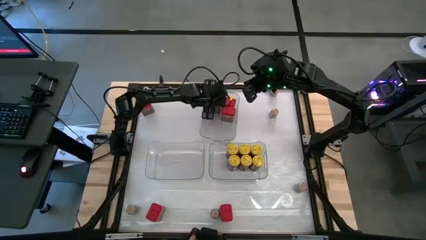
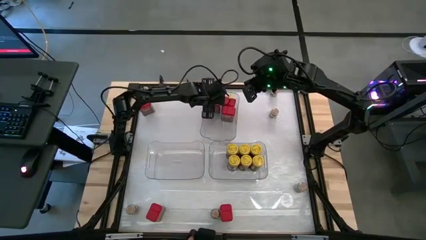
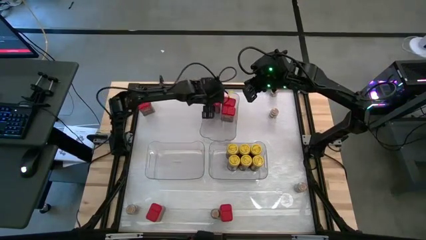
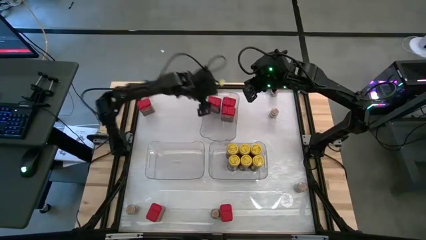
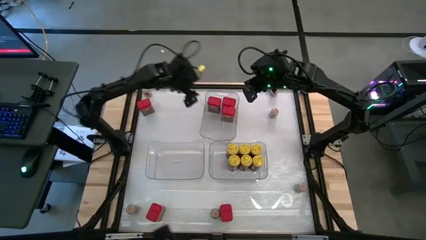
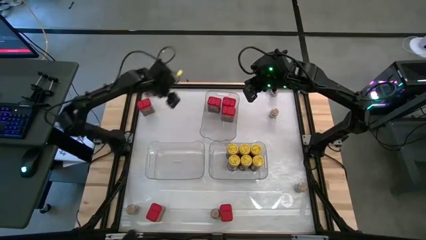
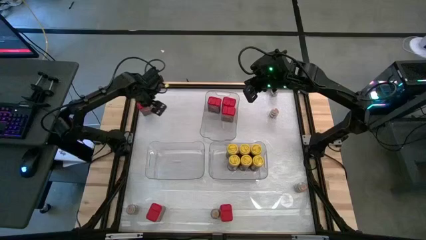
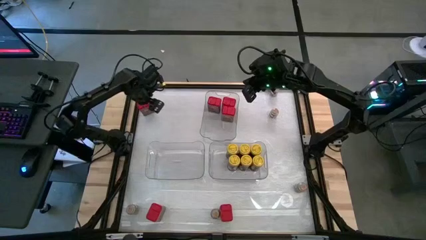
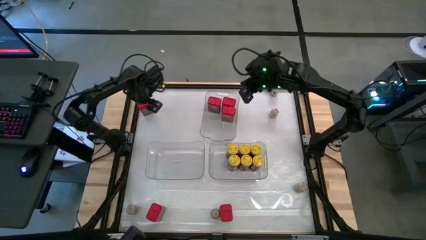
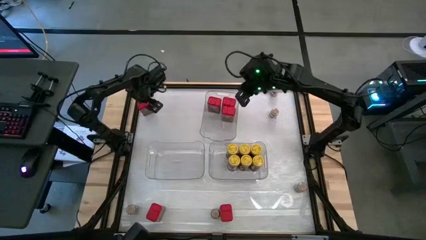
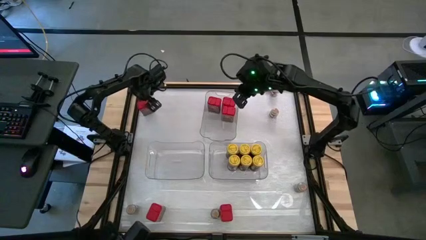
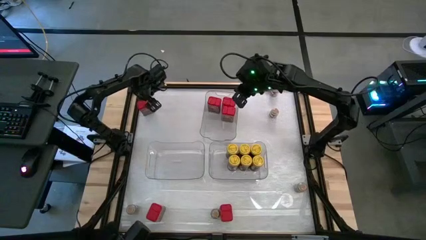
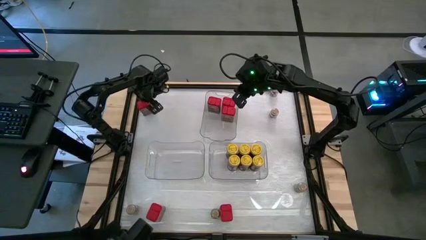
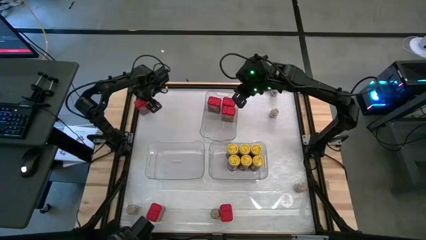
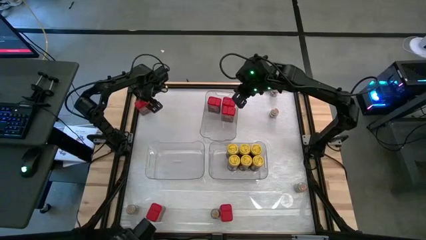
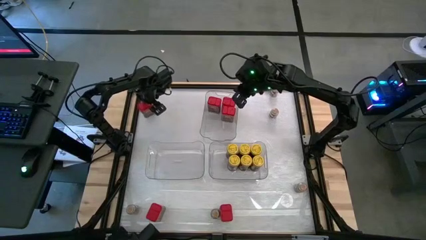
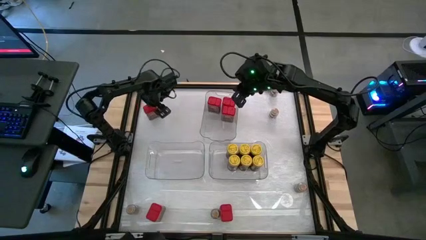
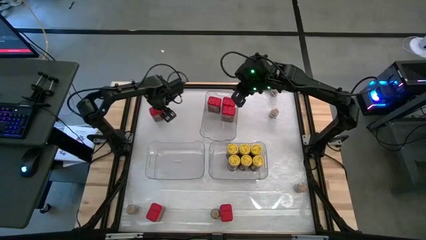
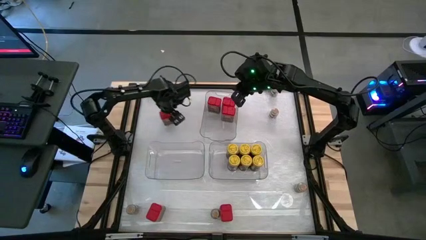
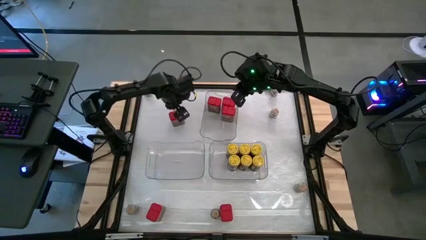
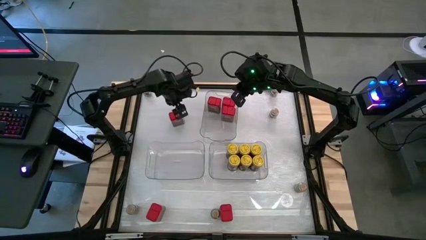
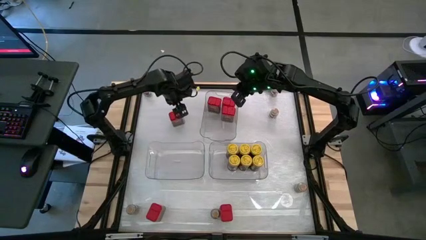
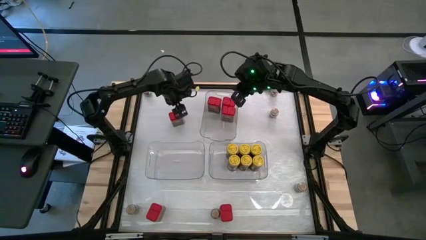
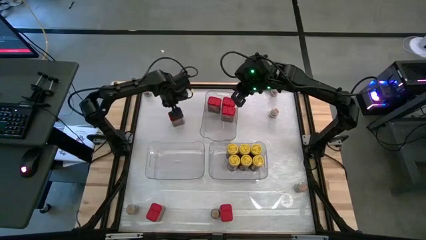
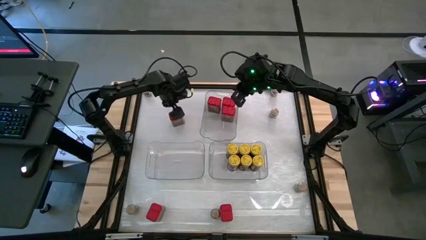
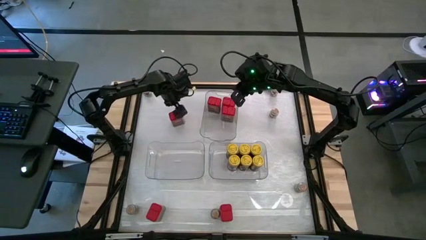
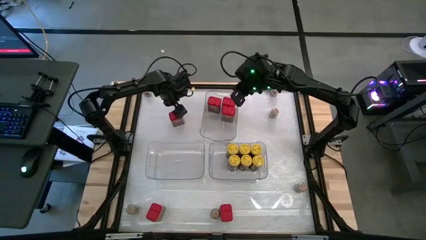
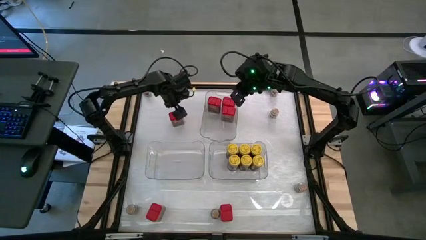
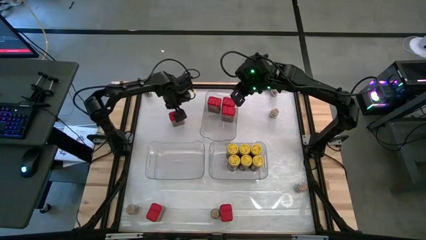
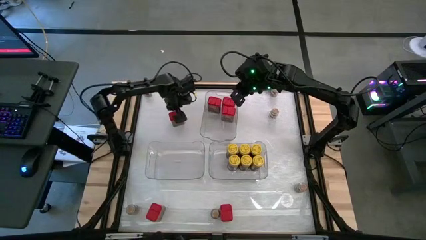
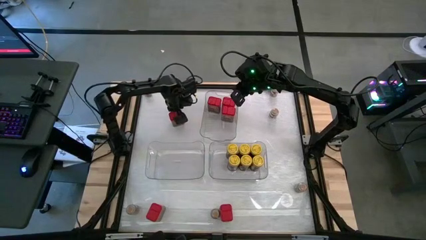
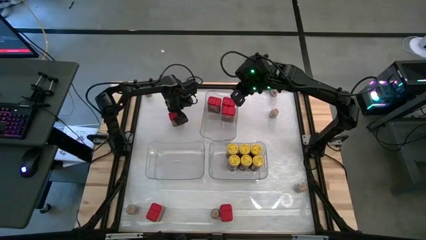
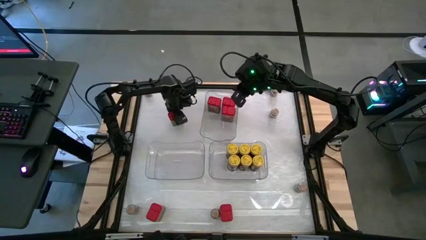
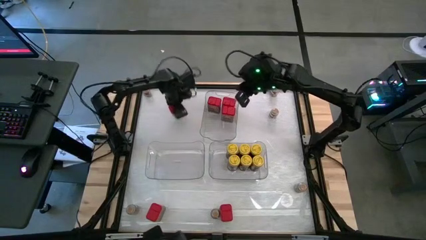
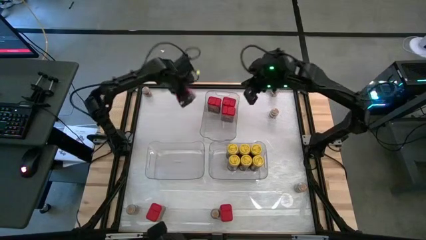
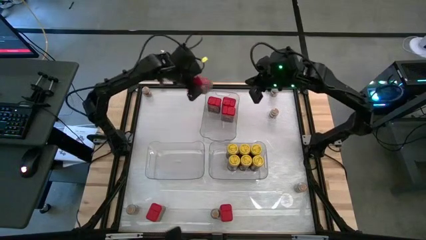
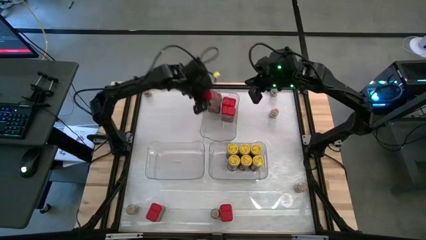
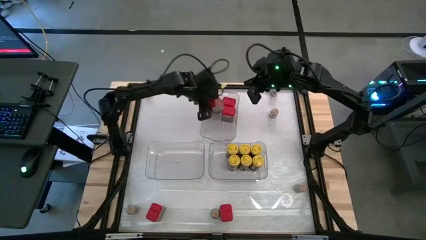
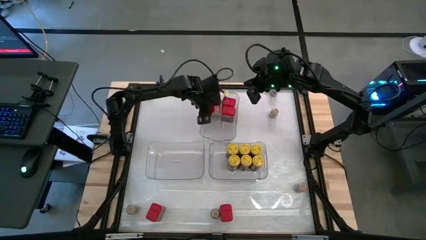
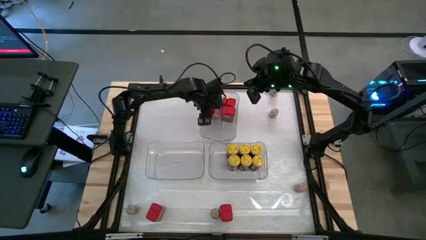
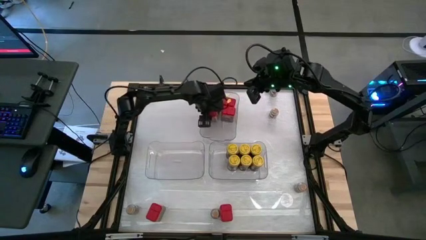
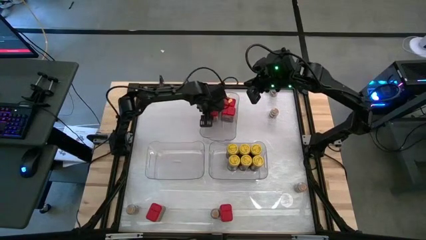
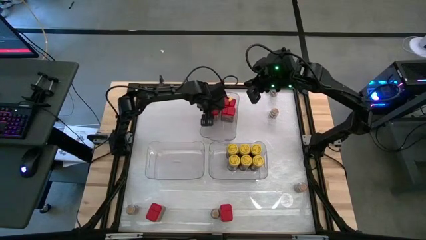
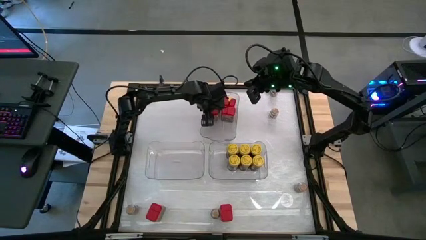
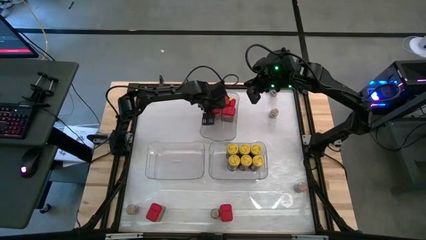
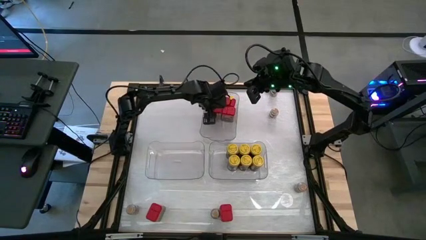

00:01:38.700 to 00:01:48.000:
Task: Sort spices by type
Put the red seasoning can into the top transparent bin

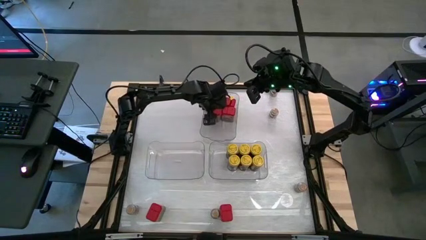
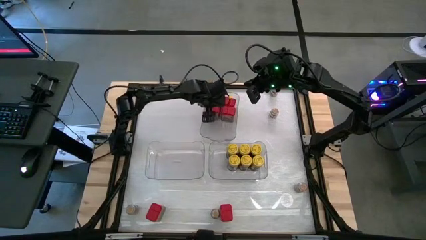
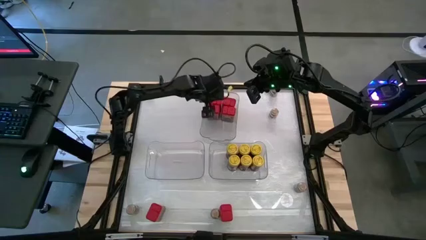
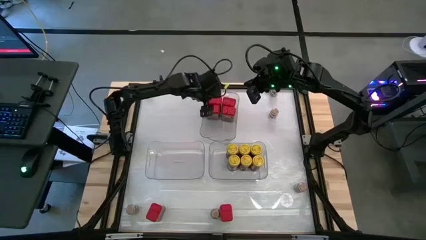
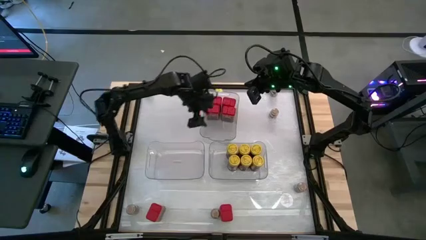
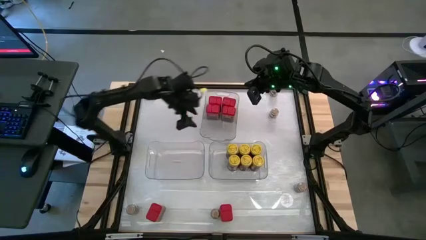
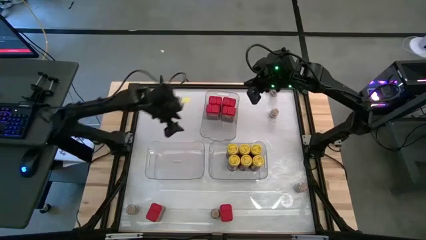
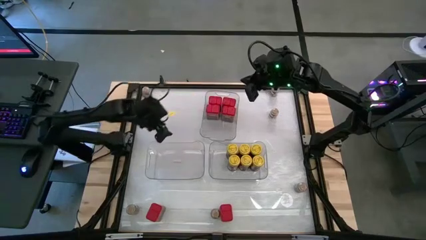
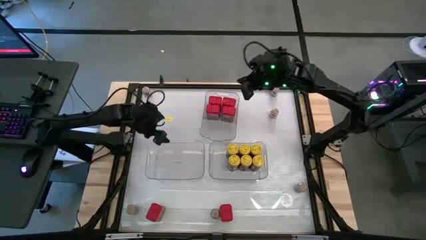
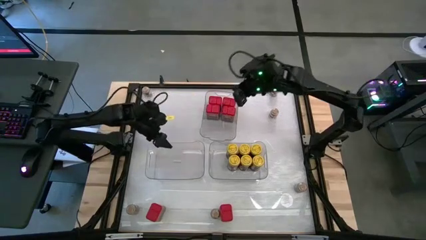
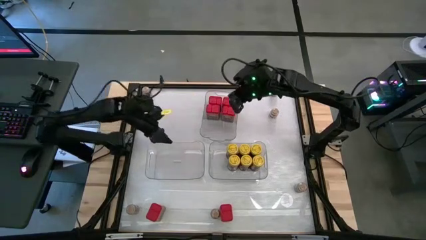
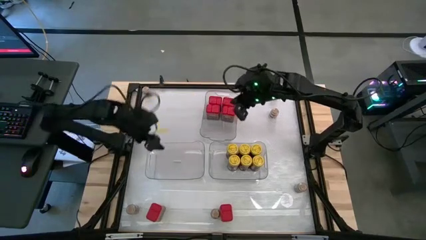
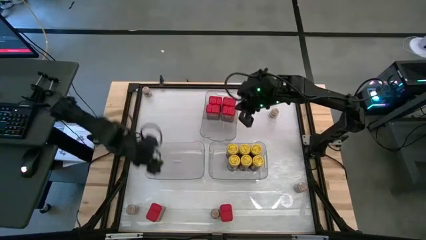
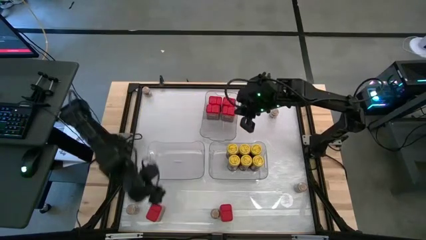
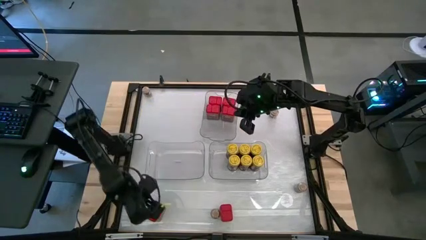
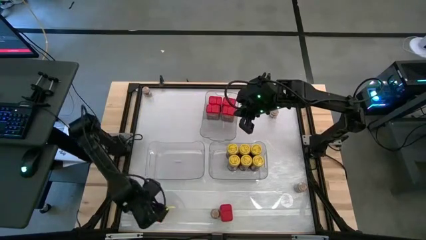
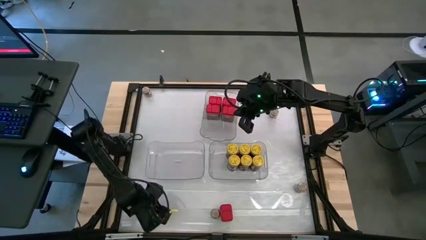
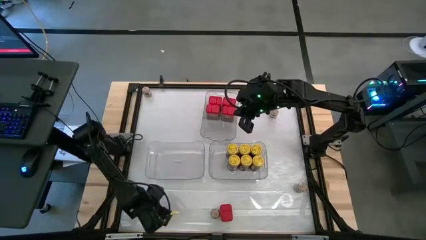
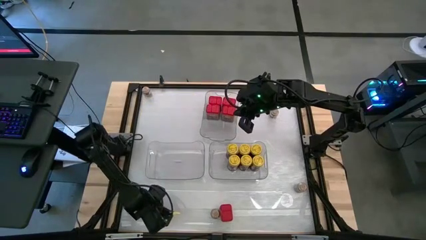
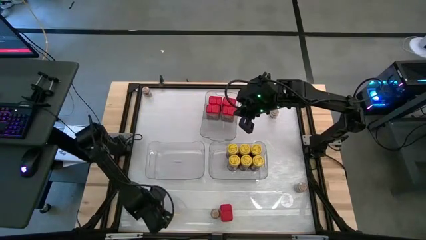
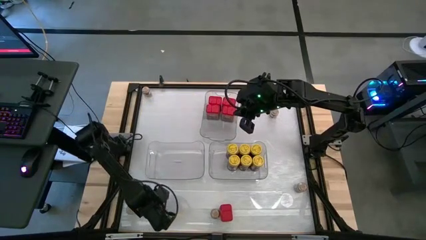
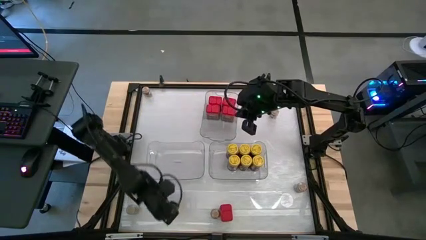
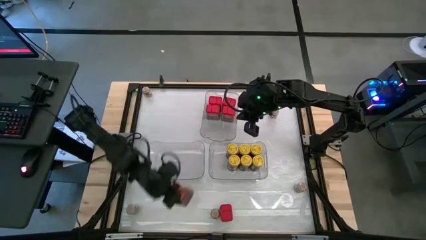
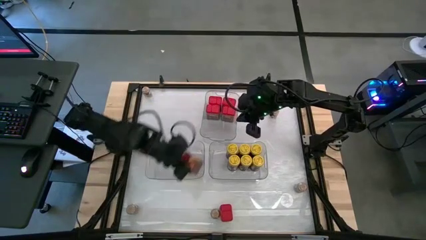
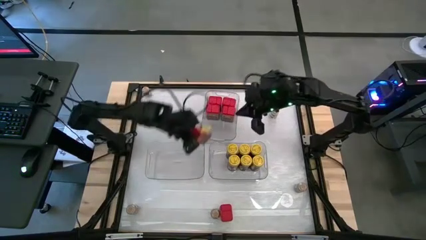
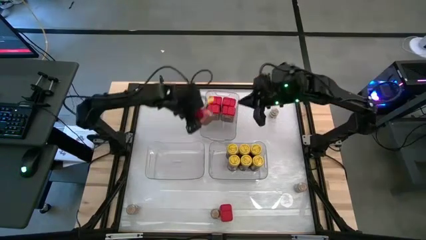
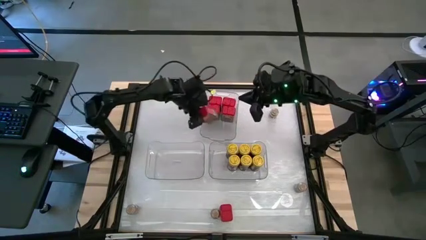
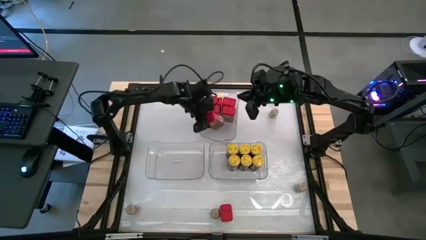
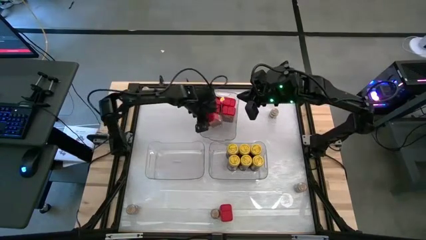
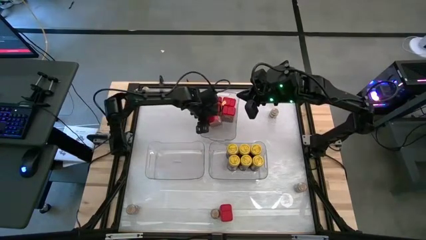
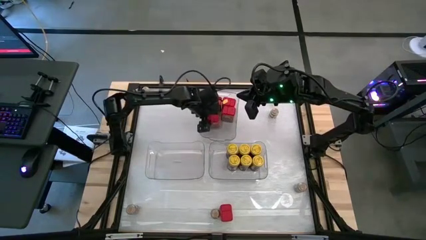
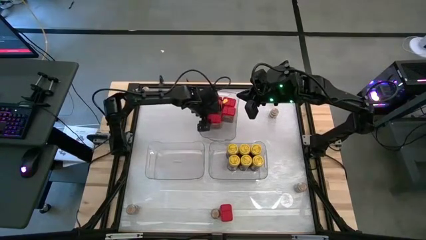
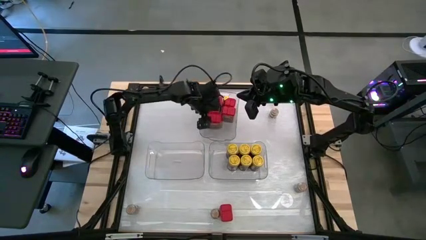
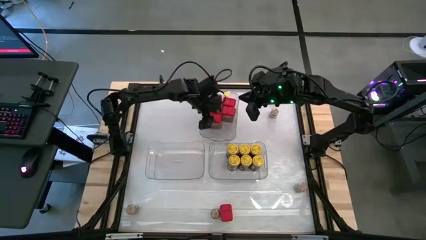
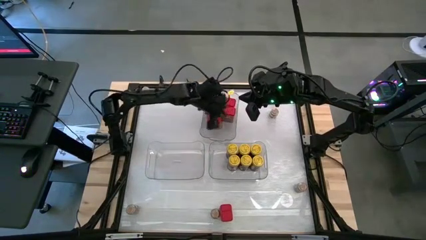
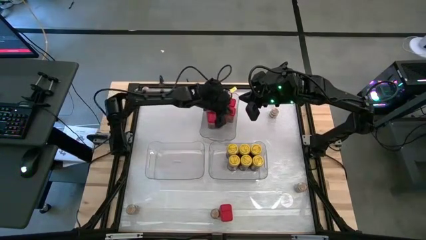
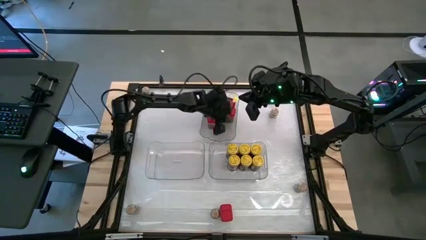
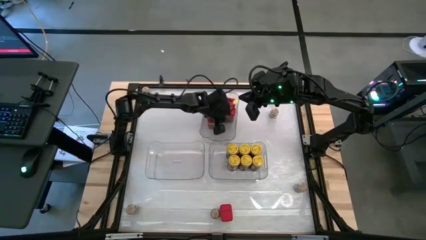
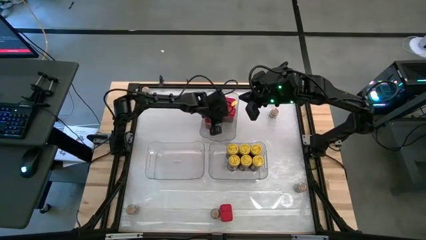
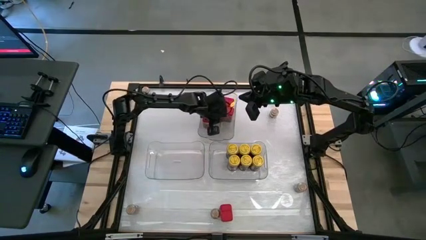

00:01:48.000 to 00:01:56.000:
Put the red seasoning can into the top transparent bin
